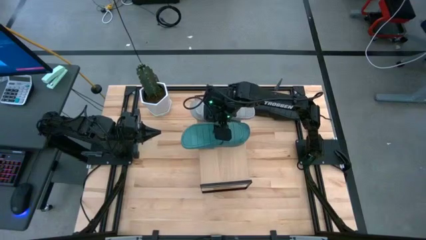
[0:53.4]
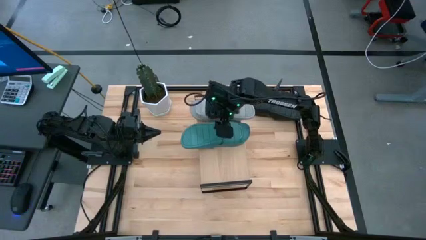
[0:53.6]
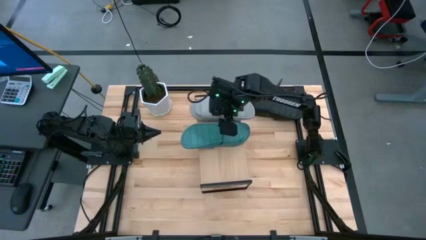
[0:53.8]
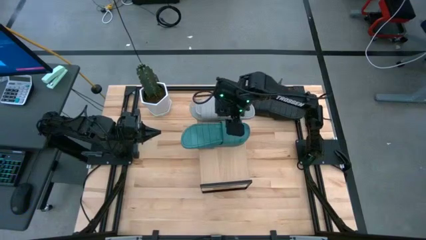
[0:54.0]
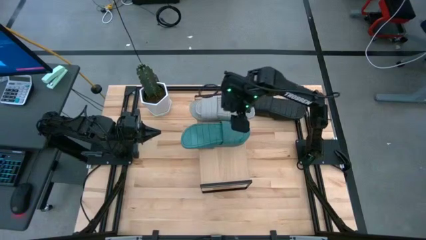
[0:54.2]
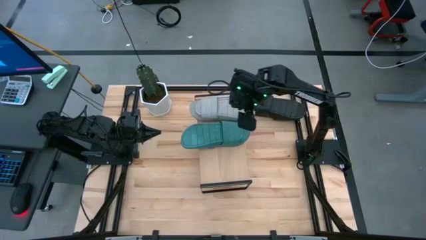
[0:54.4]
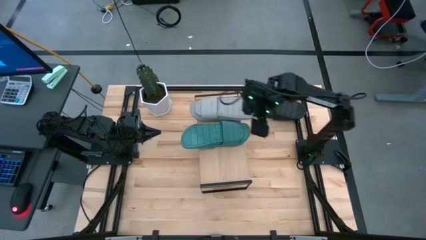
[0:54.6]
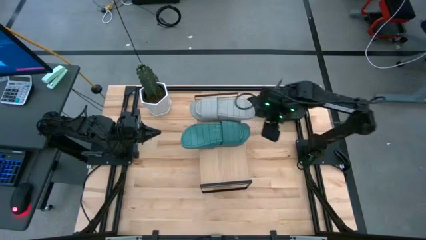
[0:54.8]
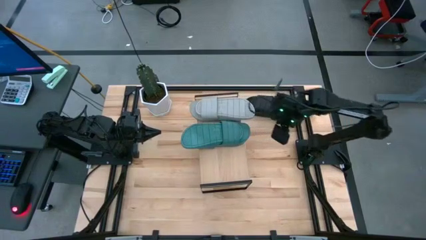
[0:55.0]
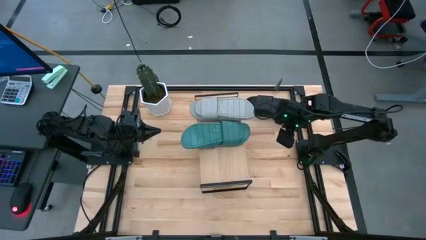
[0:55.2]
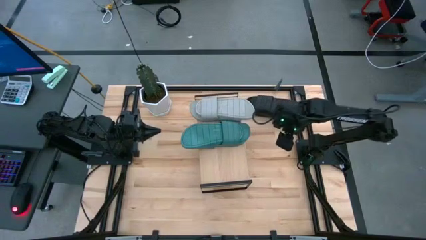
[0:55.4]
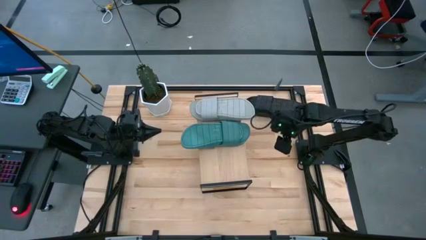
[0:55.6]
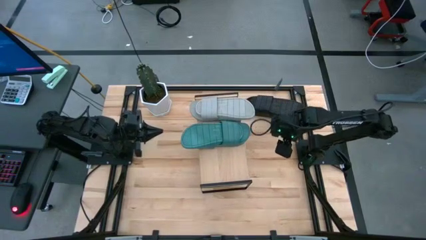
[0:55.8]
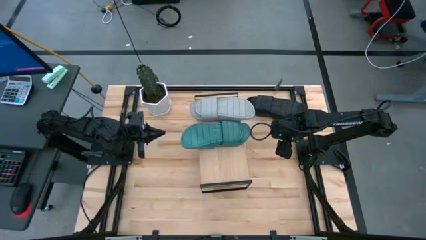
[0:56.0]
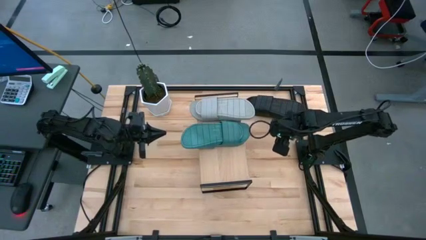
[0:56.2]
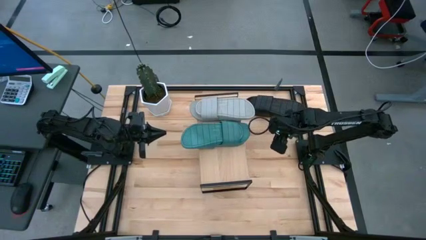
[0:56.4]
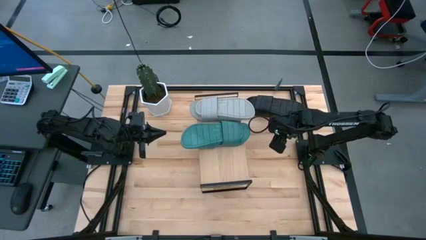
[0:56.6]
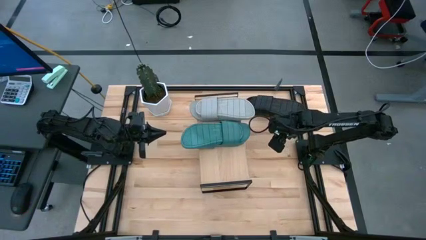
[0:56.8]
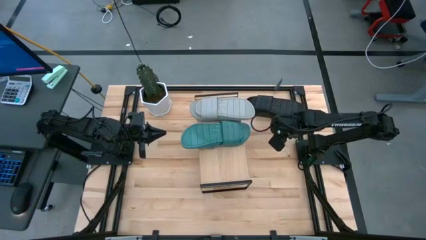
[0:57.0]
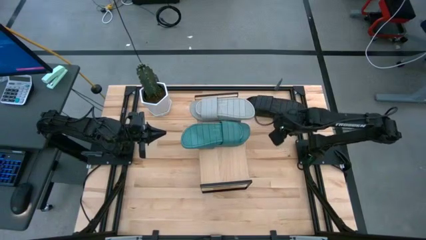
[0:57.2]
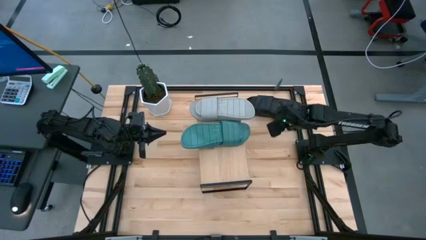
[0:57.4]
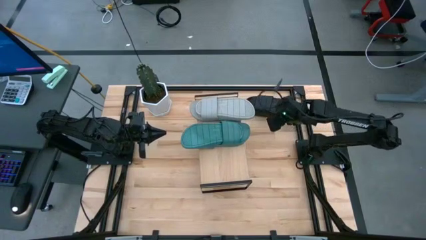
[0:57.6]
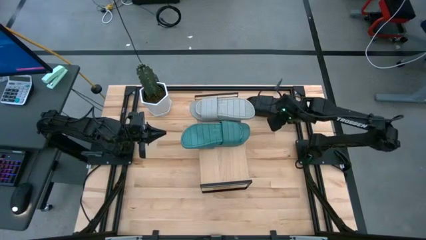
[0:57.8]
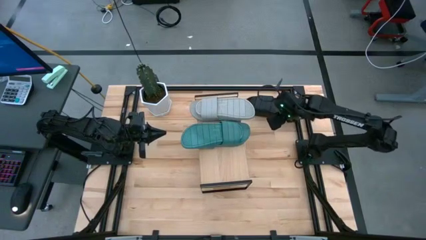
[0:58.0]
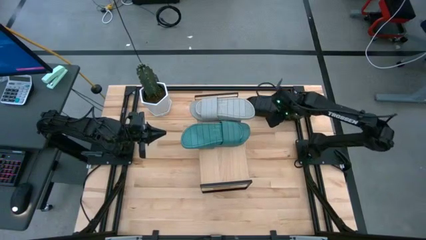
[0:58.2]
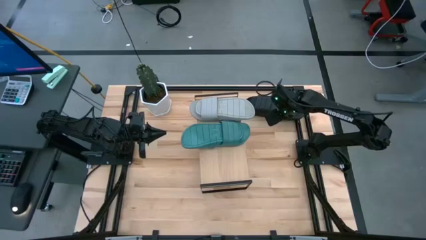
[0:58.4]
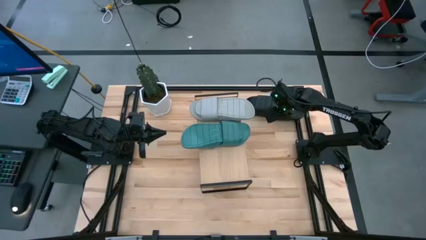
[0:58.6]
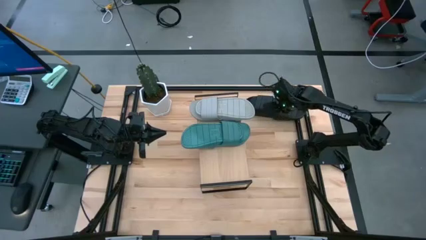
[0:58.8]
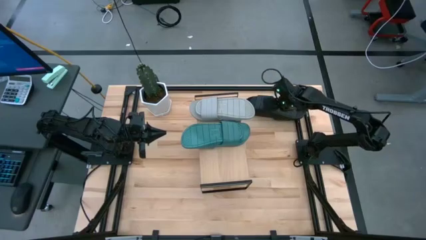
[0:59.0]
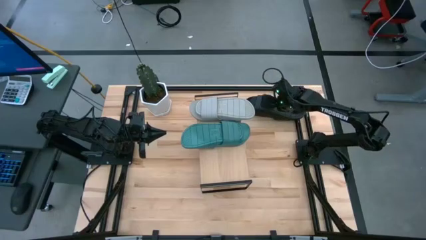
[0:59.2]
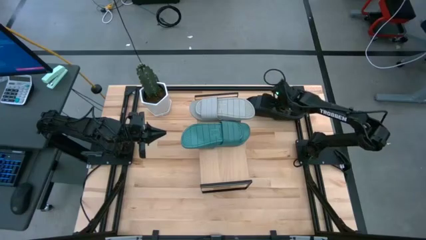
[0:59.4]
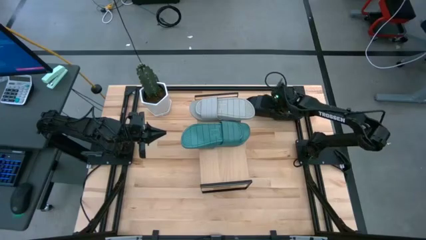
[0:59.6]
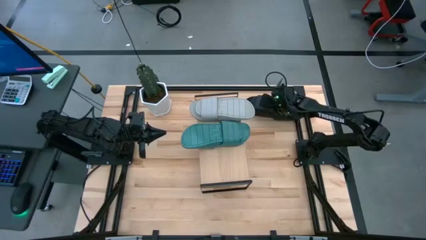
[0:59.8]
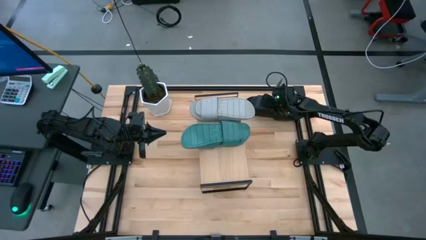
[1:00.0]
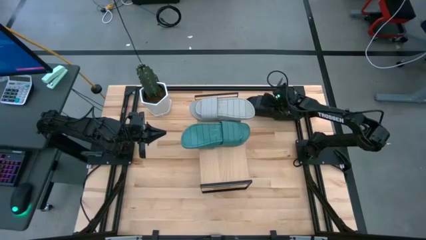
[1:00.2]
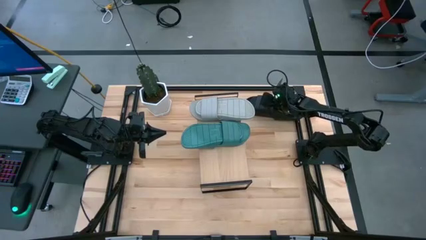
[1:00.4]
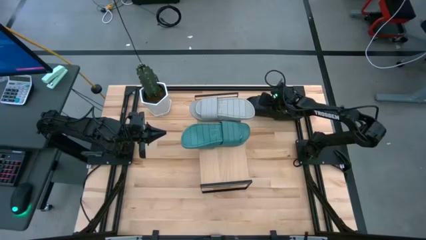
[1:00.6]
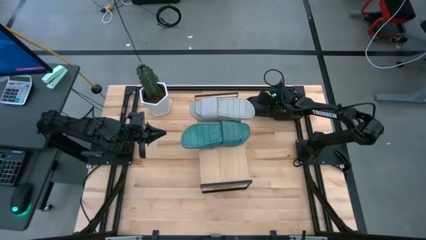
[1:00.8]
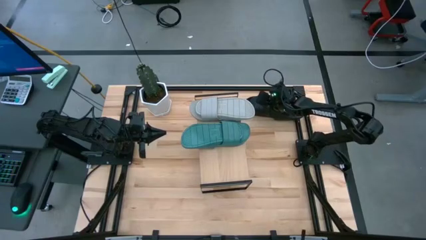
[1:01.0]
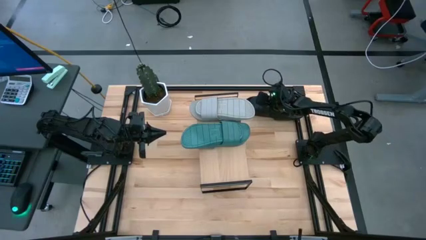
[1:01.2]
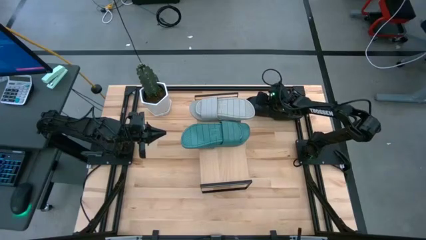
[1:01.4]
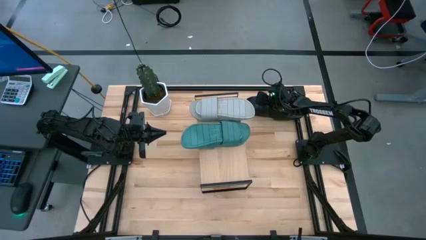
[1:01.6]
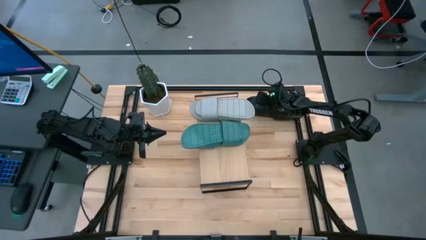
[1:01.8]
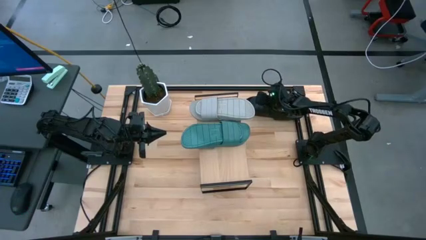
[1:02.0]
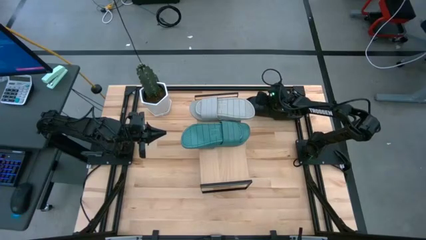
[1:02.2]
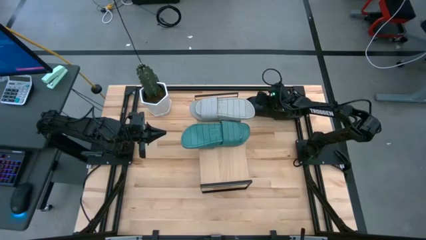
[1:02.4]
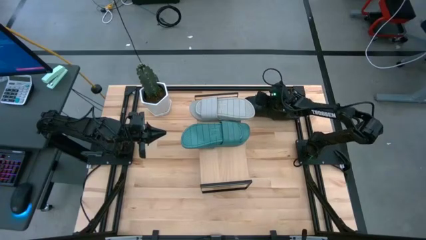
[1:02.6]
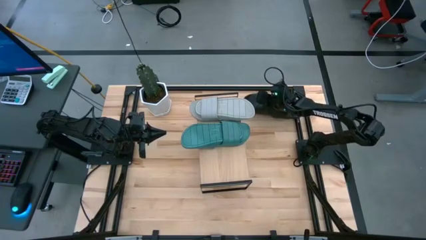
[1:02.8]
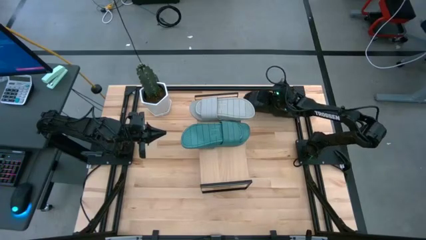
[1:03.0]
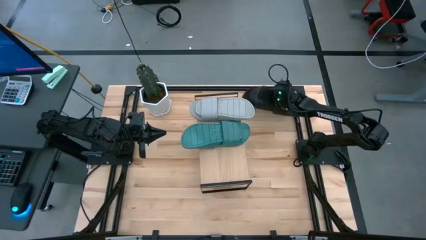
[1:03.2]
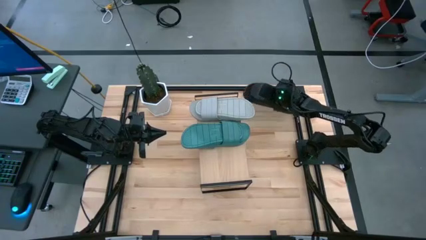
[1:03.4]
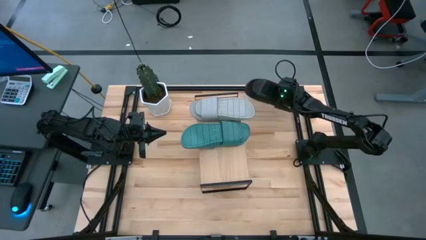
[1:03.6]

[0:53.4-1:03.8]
Task: Pick and place slippers onto the shelf
Put the black pair of slippers on the shelf

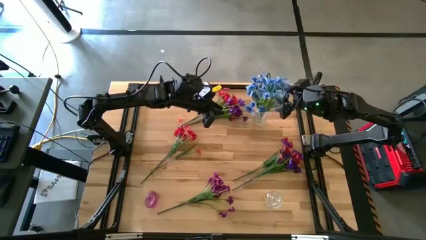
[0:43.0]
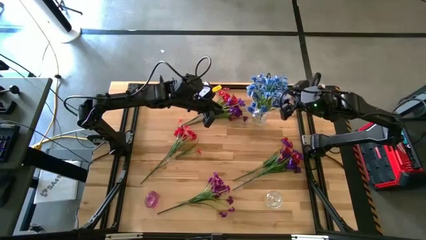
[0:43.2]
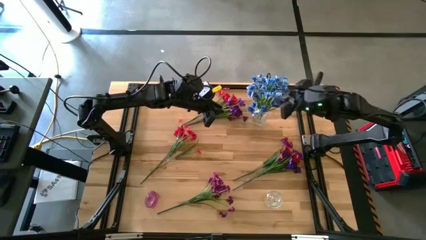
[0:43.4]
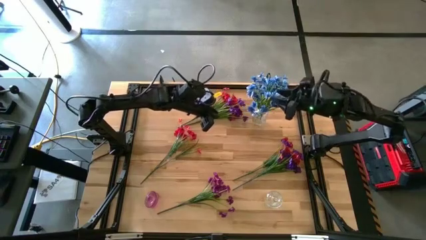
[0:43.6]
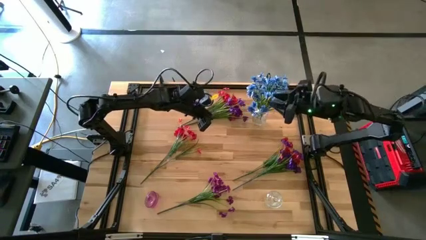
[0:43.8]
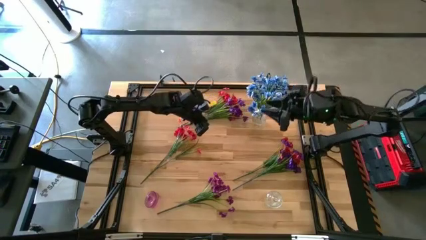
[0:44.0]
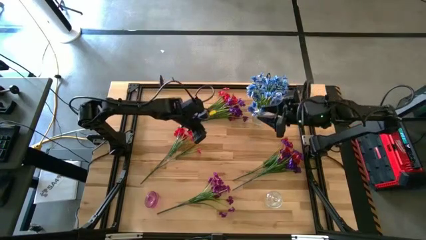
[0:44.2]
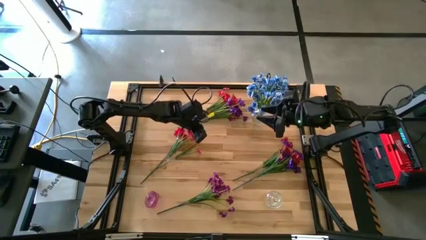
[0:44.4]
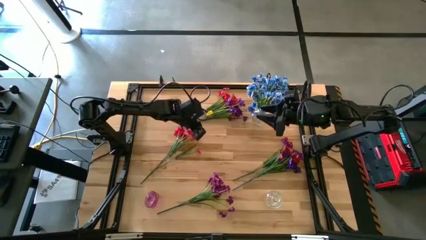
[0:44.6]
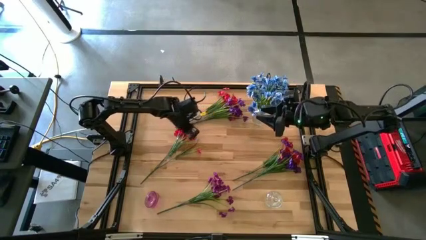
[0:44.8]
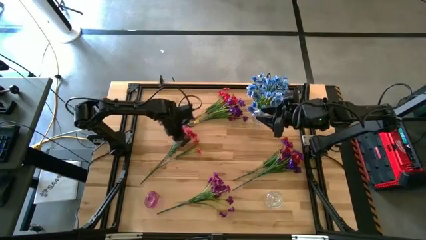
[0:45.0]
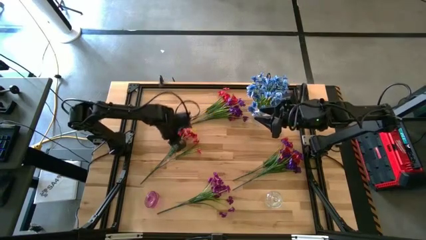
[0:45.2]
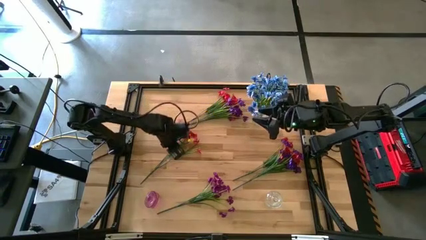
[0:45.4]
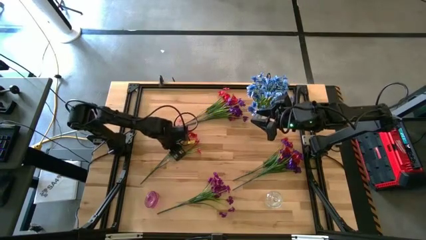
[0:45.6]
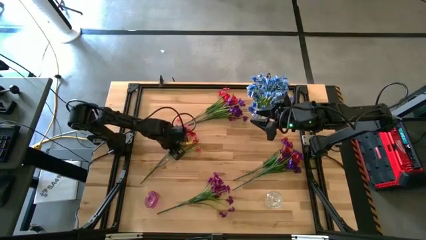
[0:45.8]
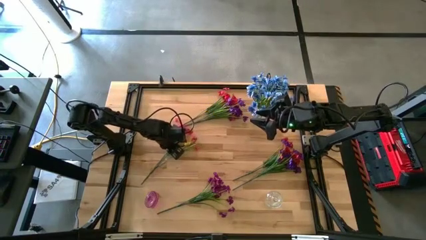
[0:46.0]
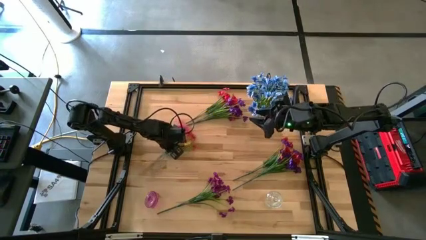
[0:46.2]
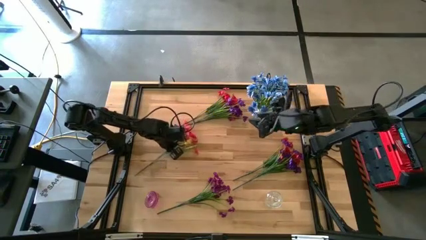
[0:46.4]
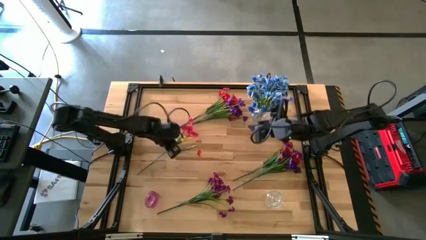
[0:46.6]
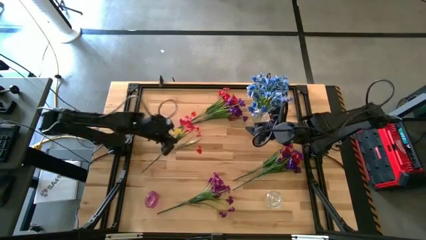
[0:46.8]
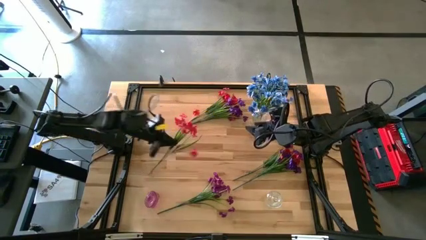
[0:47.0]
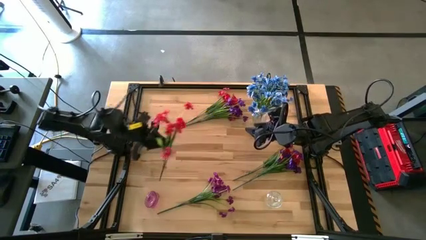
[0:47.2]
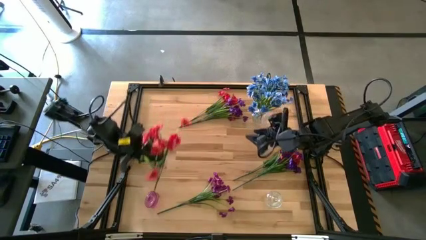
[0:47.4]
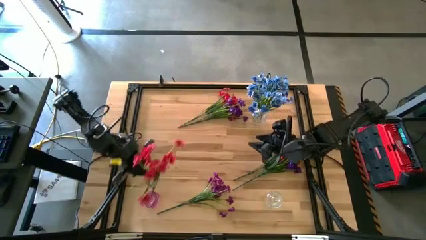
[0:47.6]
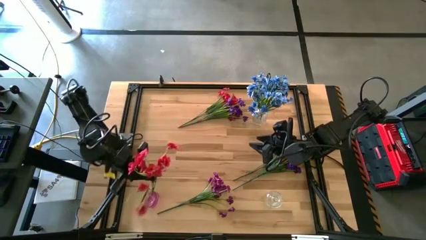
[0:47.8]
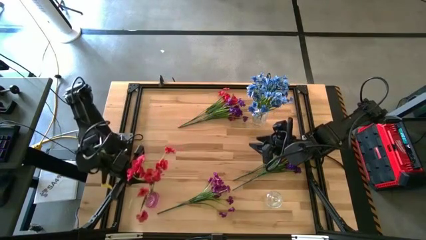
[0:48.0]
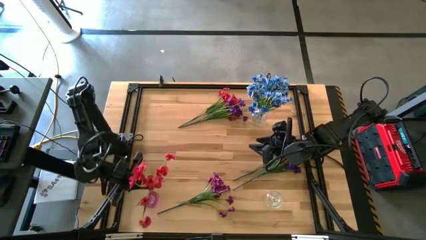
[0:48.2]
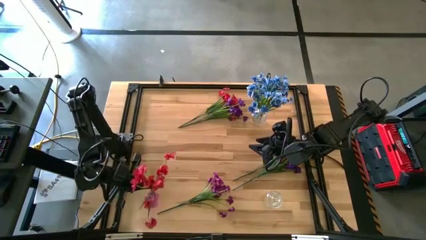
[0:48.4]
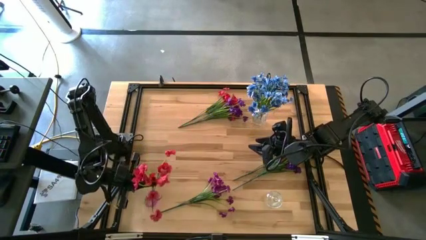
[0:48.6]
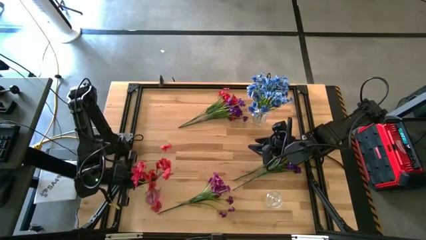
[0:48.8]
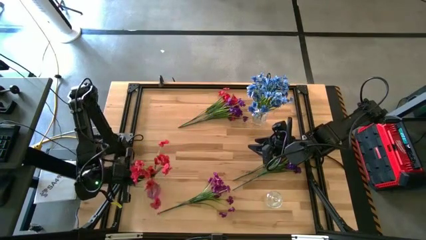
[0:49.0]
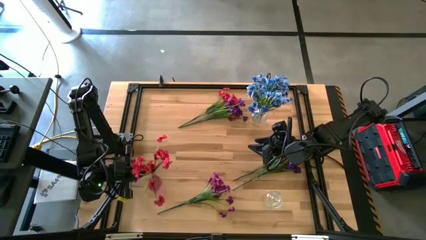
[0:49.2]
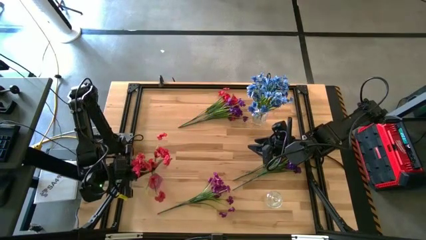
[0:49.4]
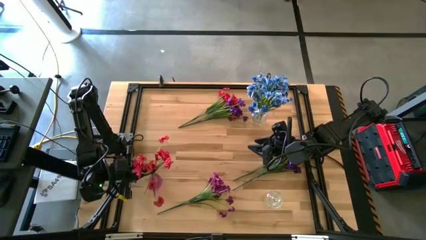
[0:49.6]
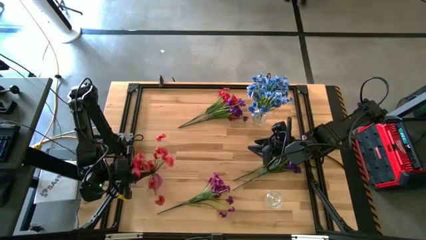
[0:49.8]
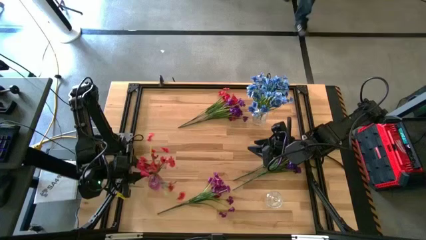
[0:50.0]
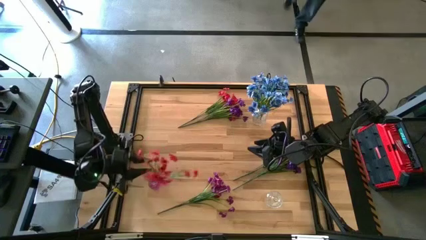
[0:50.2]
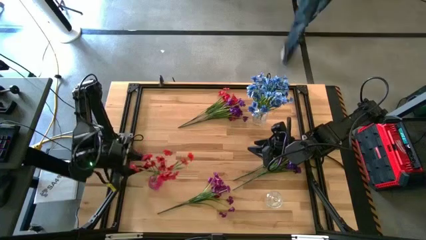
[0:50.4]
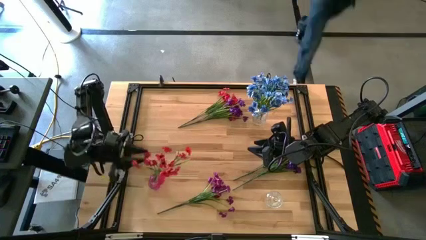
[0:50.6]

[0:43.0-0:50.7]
Task: Sort flowers into vase by color
Put the bottom left red flower into the pink flower vase
